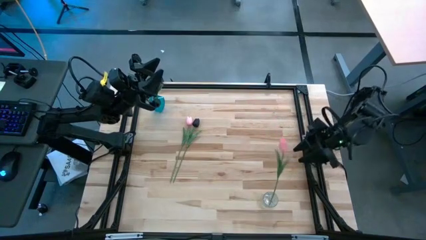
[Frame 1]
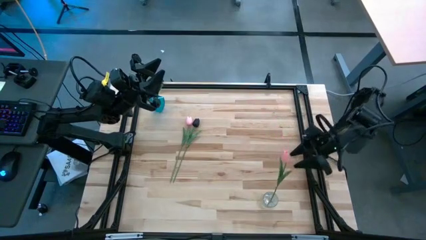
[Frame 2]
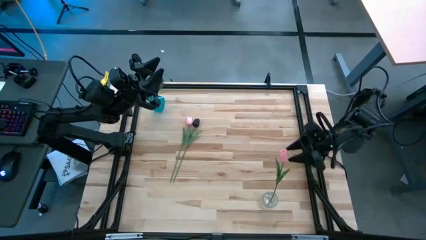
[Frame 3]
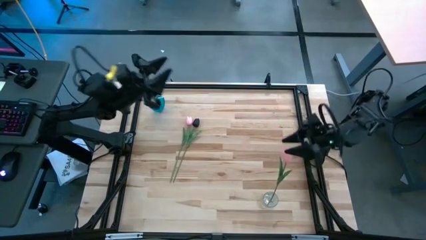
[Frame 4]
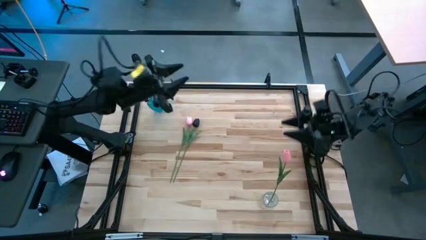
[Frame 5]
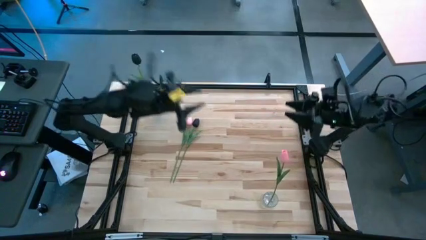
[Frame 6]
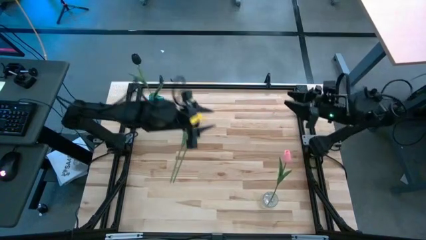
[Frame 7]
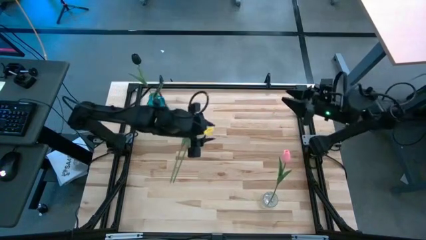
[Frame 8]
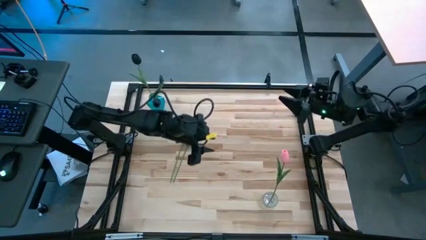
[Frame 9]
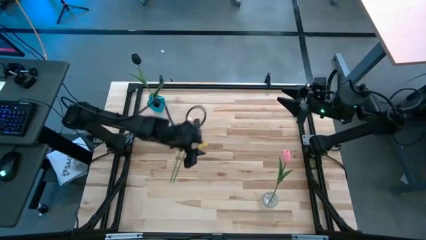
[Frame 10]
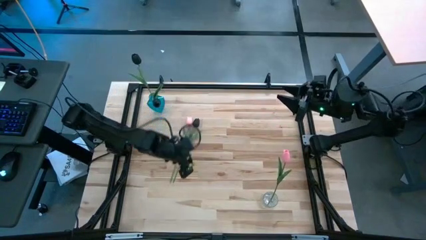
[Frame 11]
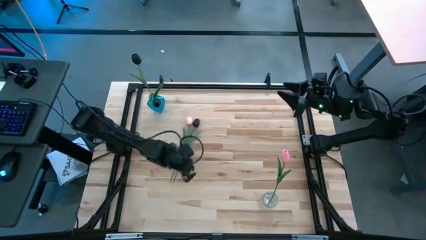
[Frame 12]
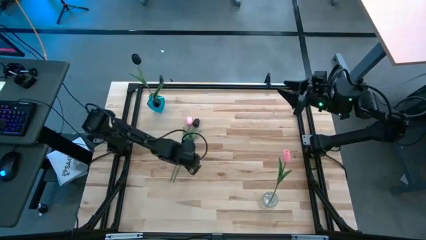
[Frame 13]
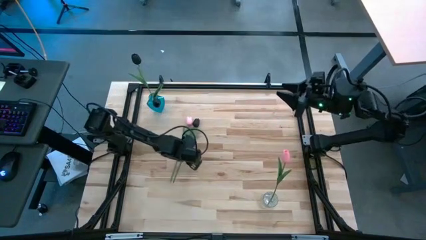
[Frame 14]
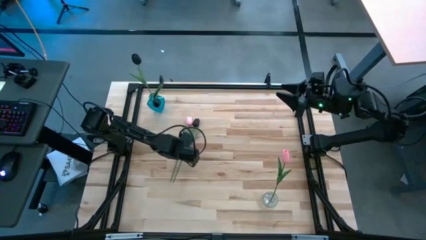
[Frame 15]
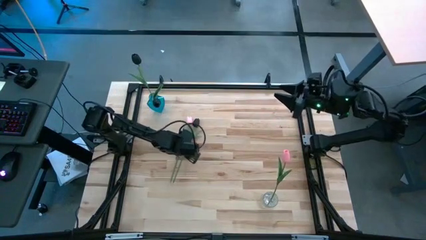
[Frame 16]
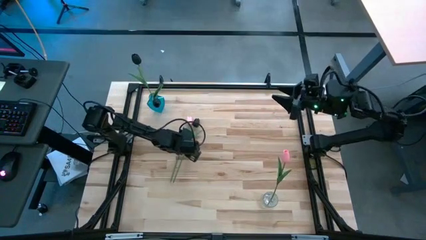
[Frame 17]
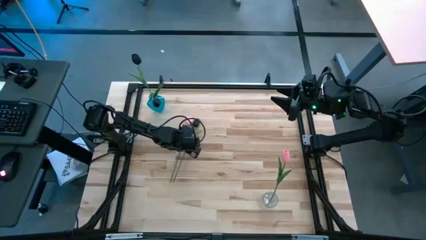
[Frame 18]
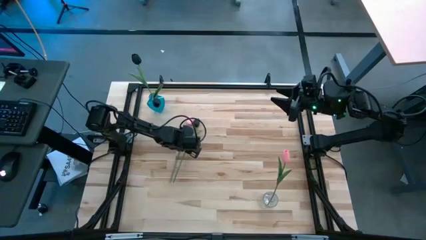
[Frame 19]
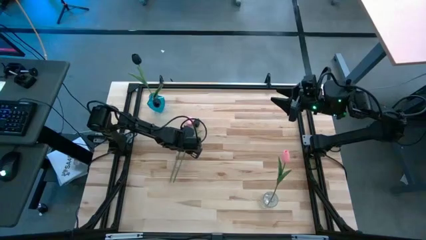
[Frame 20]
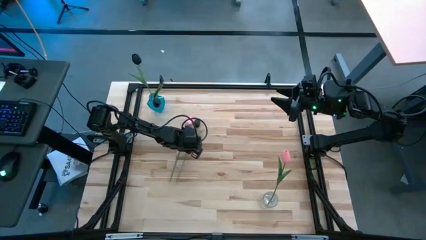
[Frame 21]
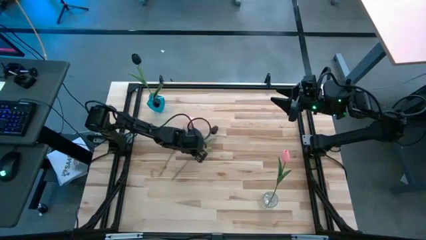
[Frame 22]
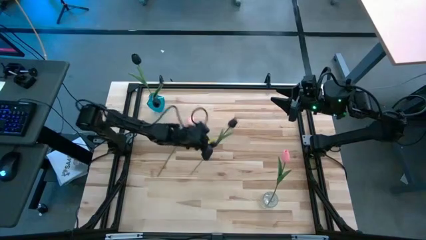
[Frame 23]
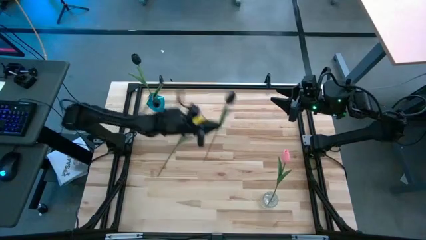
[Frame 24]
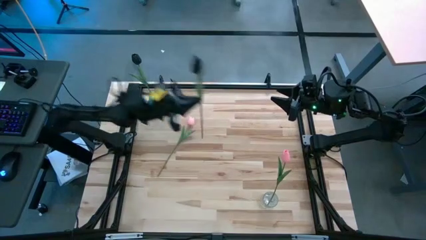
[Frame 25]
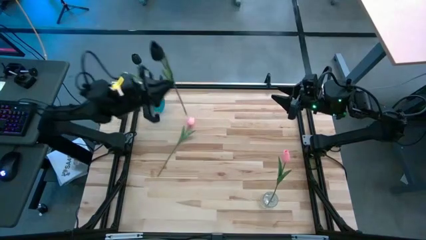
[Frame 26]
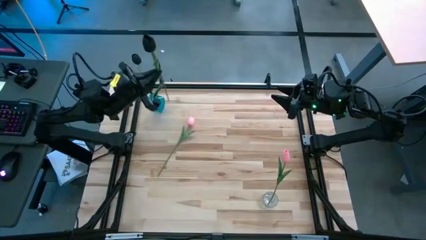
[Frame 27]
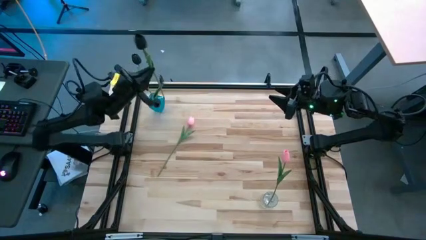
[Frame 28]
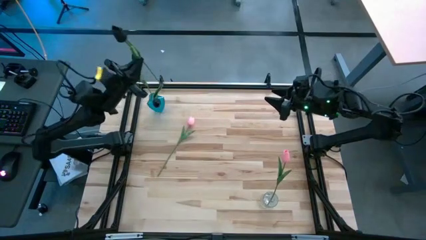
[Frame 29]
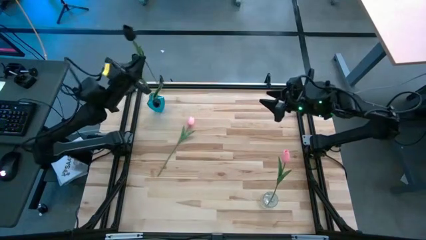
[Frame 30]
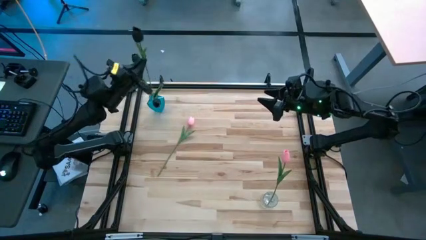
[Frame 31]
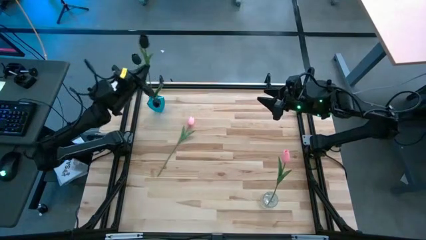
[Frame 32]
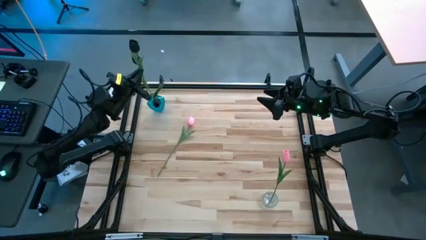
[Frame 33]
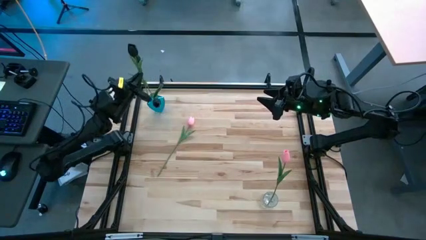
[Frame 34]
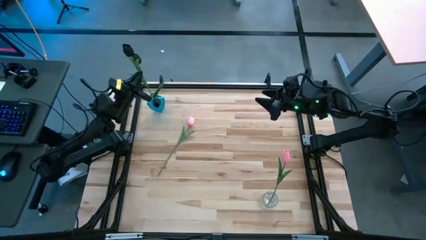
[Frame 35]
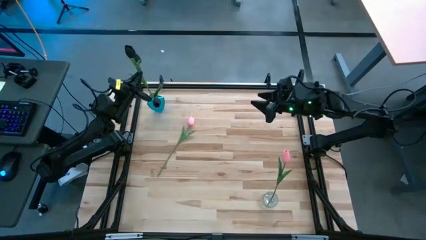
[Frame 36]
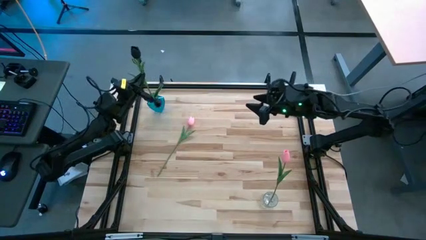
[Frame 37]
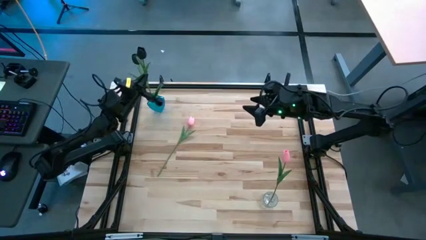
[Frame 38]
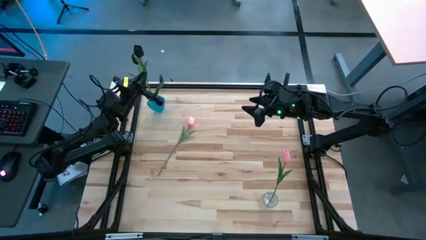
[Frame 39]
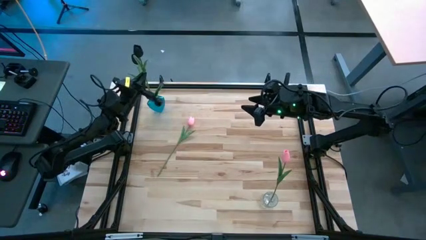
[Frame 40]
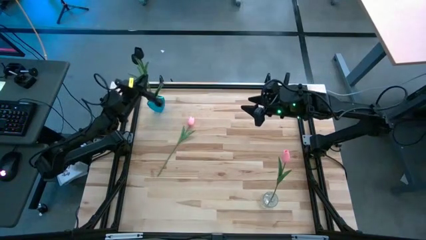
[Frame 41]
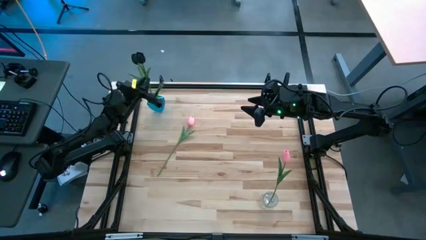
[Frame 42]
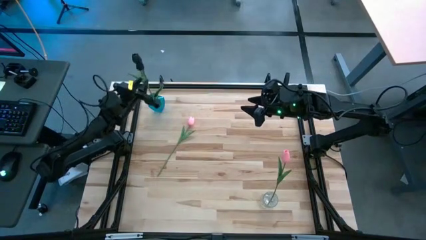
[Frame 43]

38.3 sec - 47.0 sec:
Task: Sort flowers into vase by color
Put the black flower into the blue vase

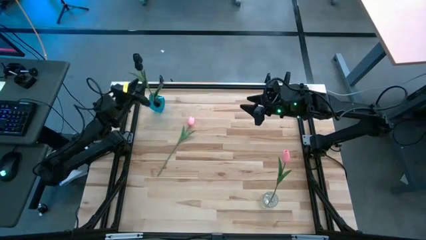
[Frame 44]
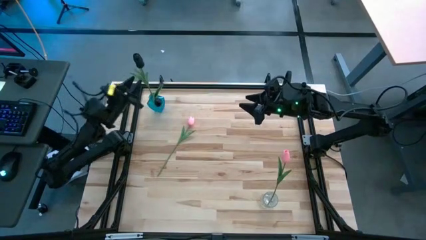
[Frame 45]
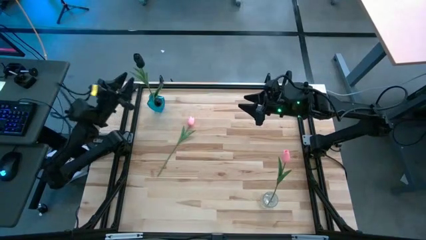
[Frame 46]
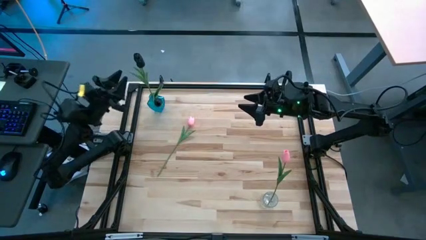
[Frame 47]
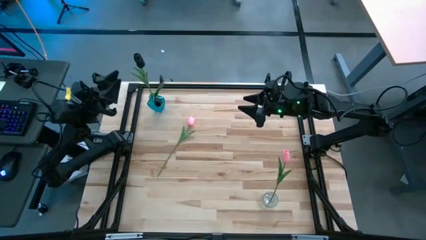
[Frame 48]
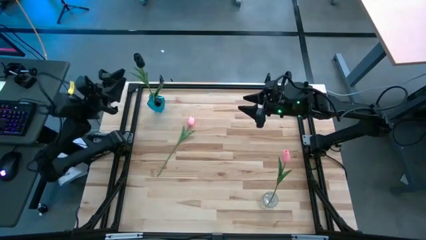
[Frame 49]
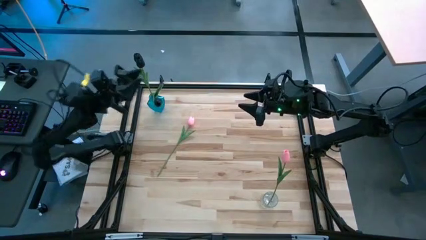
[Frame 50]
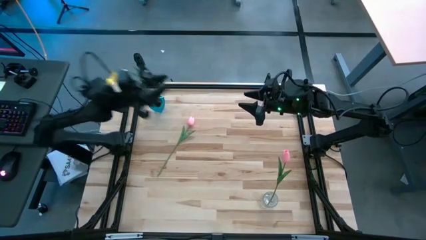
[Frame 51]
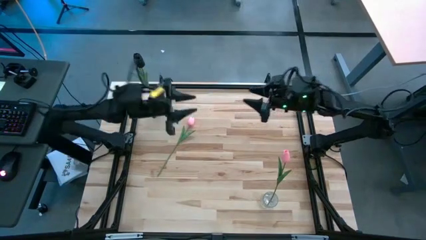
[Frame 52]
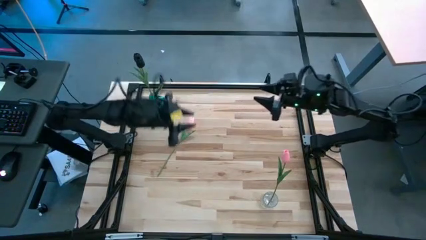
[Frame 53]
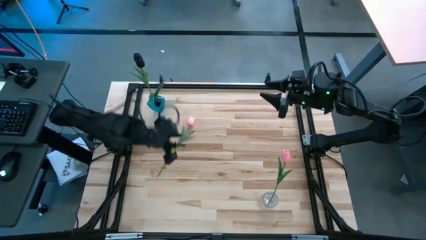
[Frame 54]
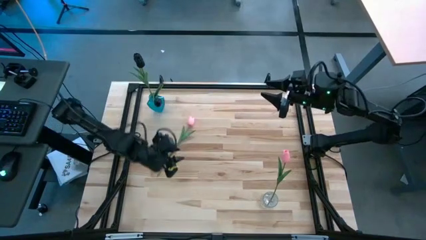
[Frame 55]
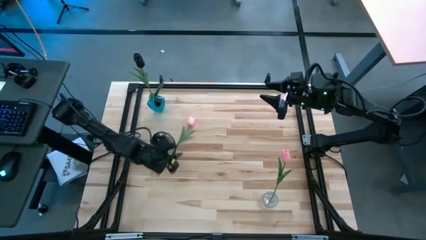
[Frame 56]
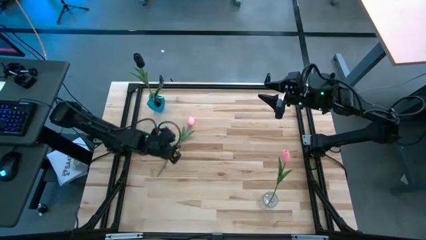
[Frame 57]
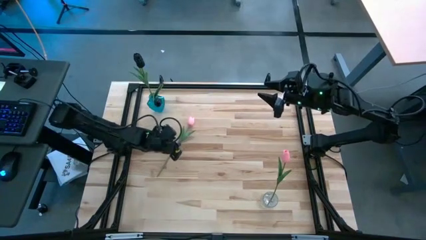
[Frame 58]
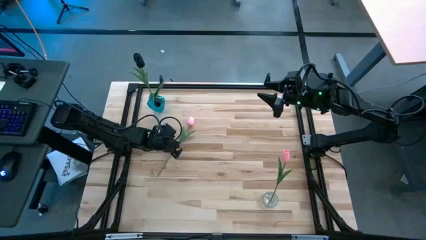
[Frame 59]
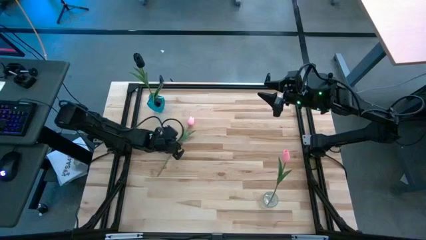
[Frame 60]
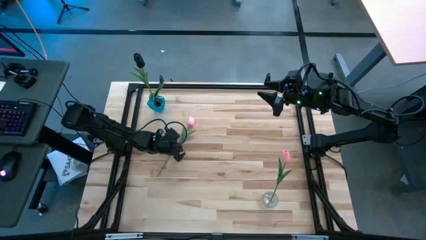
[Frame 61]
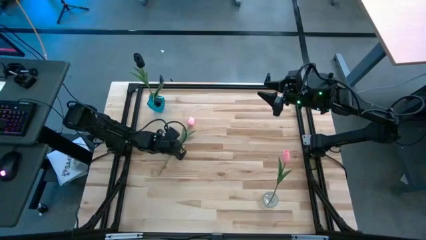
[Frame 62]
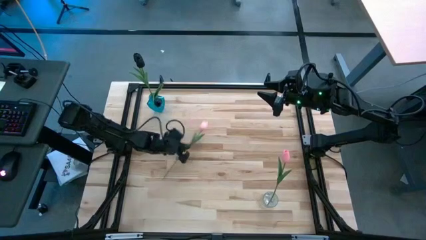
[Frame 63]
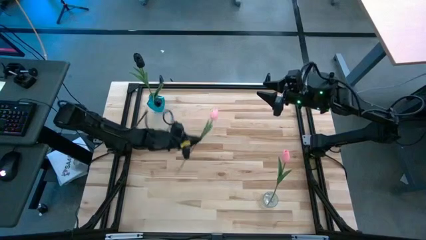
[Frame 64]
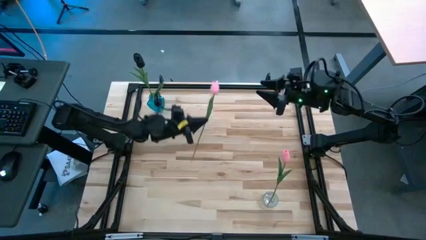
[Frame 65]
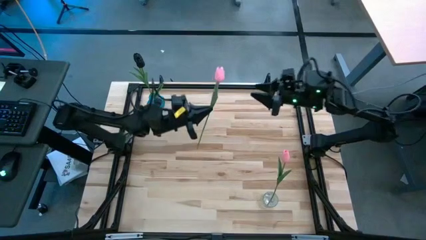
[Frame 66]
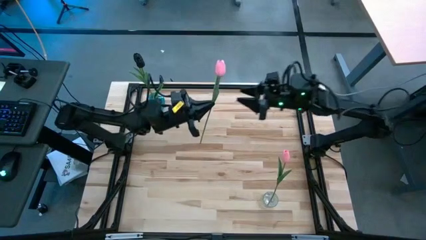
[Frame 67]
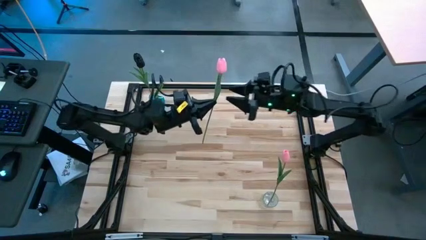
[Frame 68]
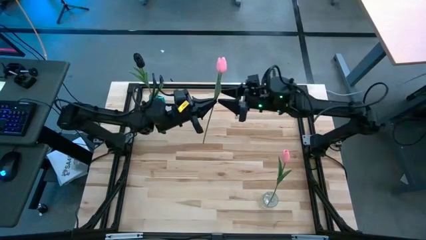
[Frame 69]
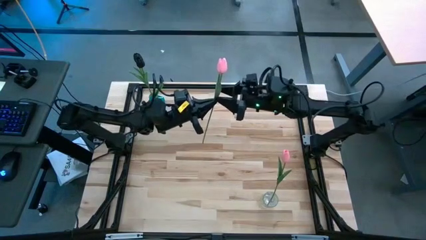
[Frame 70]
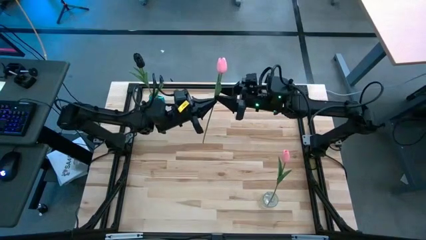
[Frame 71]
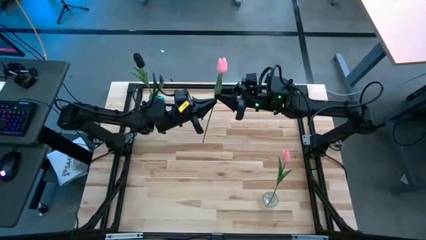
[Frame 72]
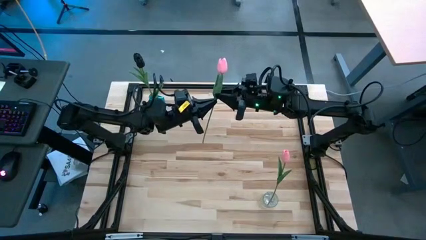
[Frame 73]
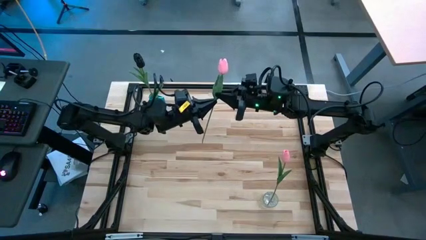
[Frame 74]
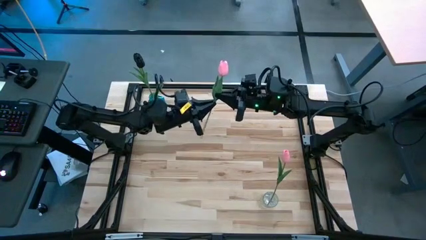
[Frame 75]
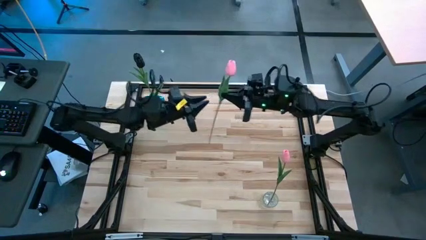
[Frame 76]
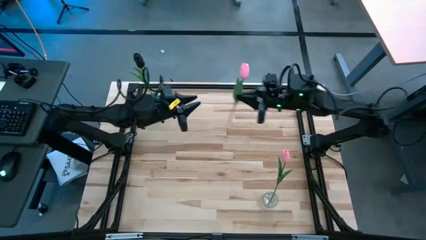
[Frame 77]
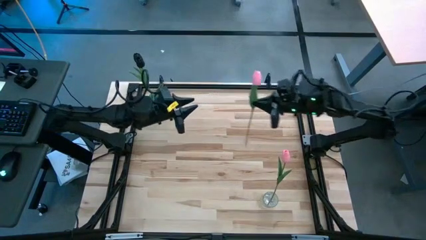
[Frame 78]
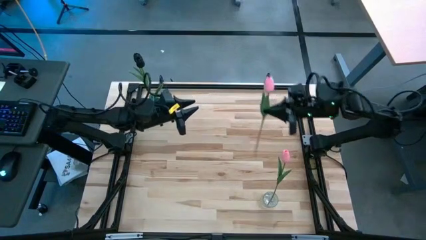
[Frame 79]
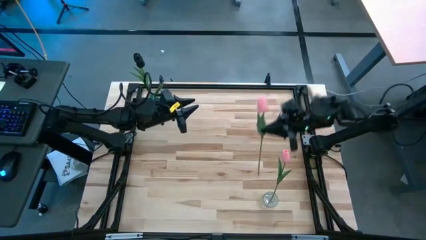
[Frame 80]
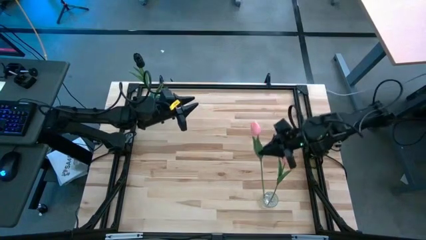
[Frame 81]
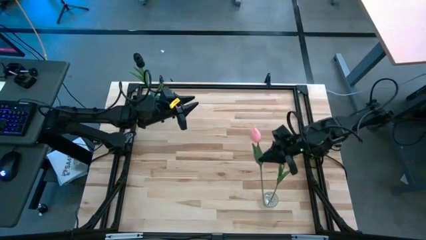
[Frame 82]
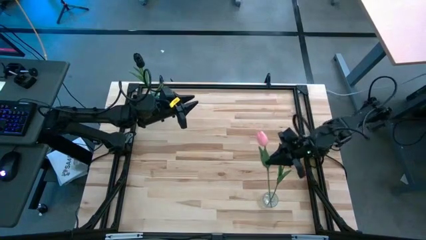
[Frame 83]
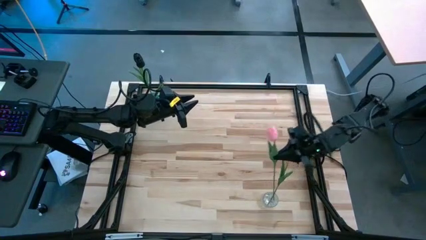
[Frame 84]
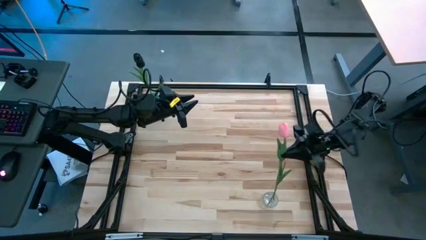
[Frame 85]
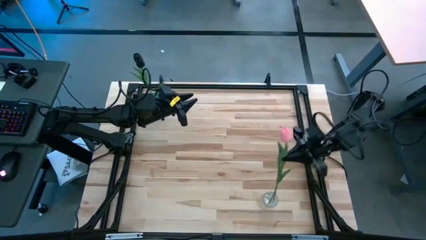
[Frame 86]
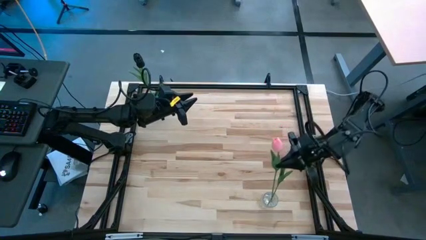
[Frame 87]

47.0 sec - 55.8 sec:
Put the pink flower into the transparent vase
